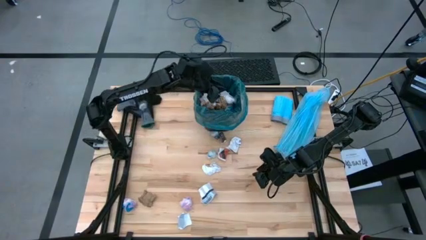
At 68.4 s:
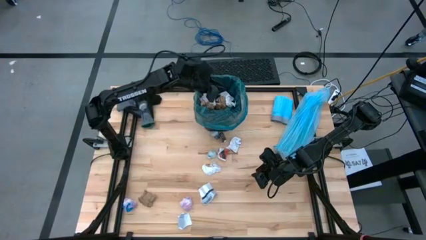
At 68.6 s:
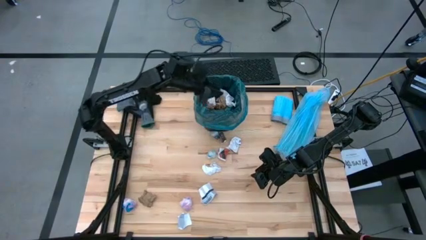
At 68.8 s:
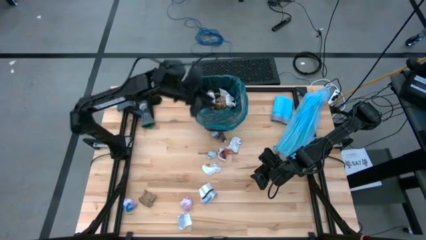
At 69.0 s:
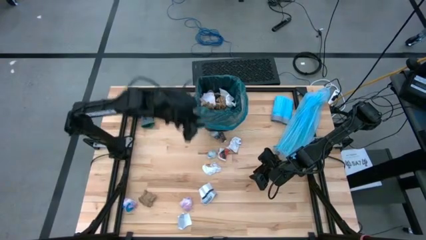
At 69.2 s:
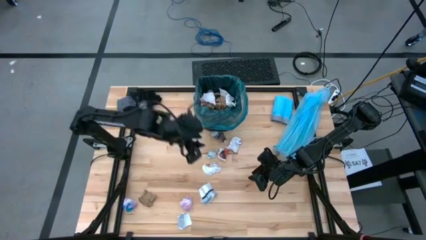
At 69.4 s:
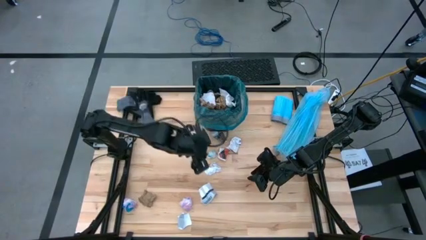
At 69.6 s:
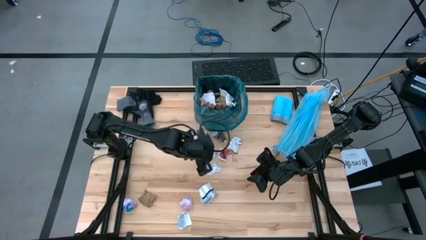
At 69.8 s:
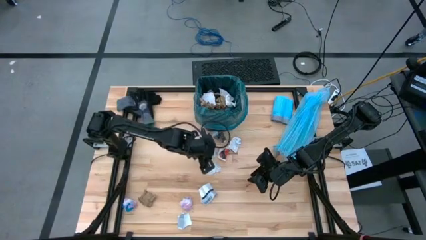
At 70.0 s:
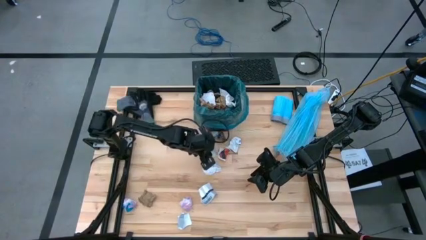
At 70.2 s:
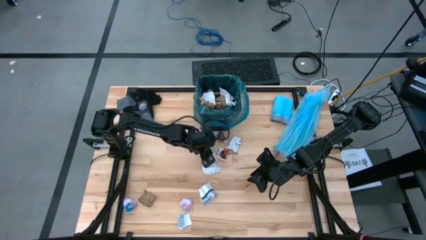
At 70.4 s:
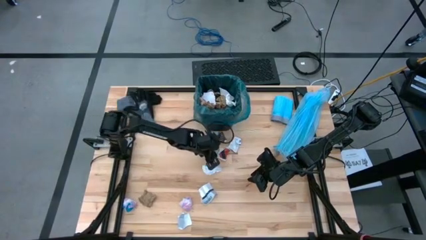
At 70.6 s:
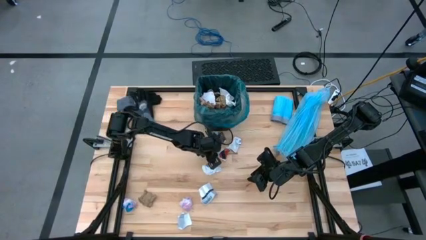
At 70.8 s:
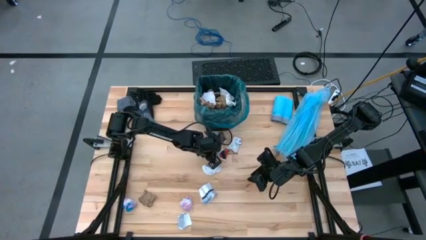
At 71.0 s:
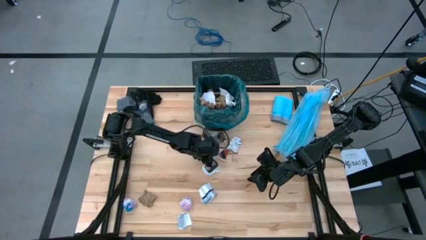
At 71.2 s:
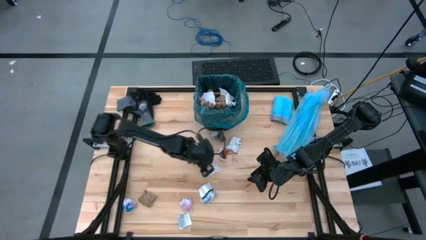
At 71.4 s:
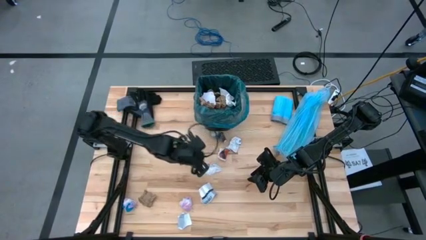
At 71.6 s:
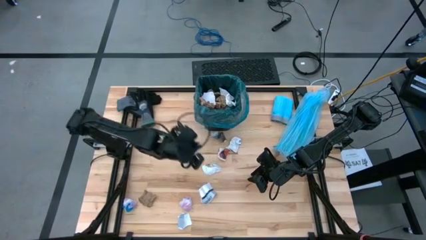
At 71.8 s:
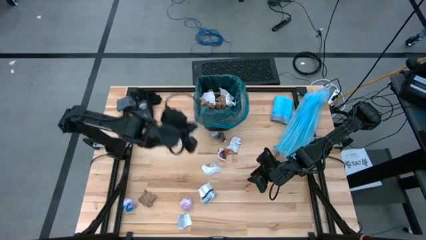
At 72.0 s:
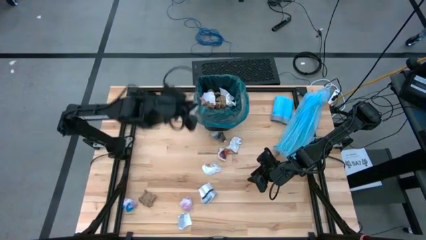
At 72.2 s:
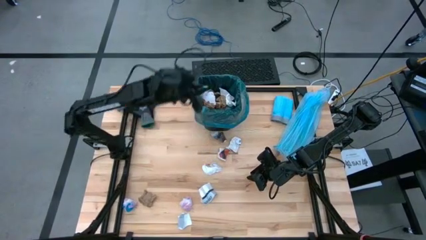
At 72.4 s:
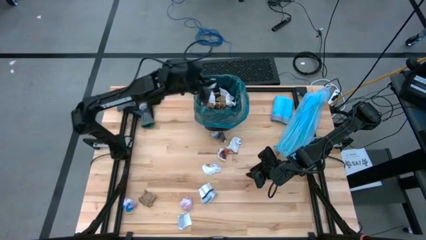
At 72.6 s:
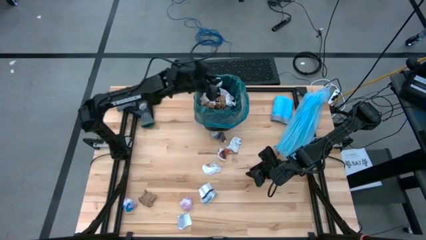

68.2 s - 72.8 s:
Task: place trash/remove bag and relplace
Put the blue plastic into the trash bin

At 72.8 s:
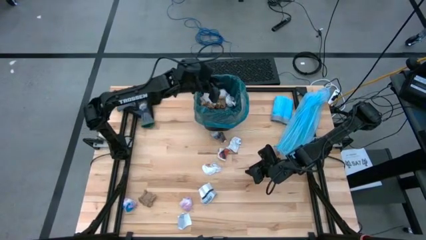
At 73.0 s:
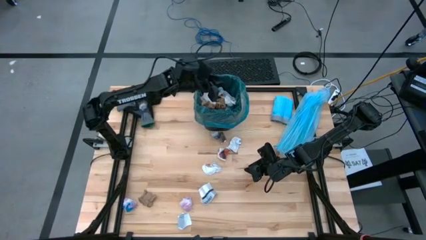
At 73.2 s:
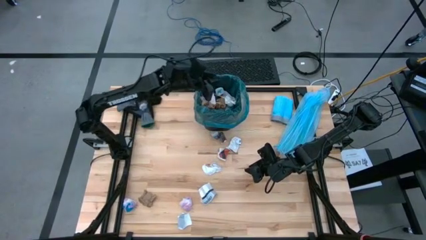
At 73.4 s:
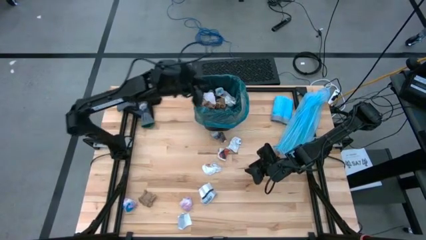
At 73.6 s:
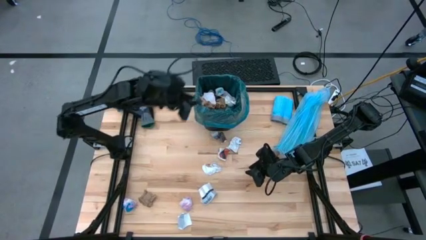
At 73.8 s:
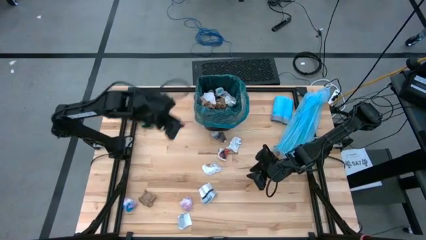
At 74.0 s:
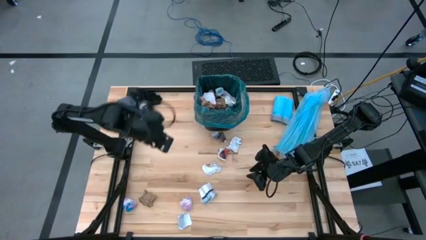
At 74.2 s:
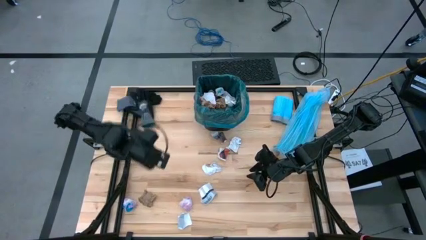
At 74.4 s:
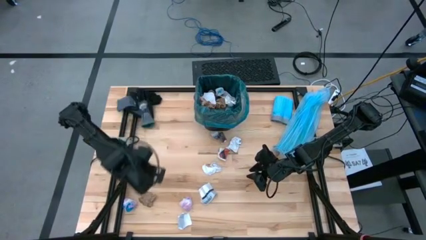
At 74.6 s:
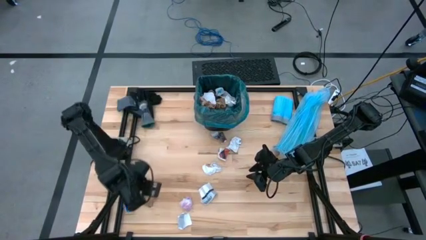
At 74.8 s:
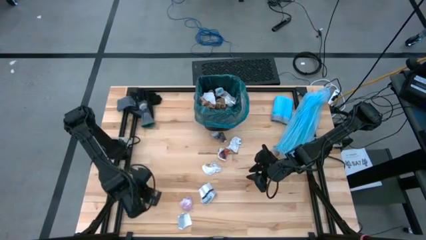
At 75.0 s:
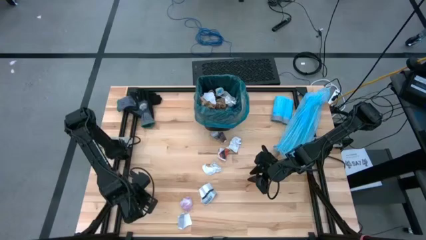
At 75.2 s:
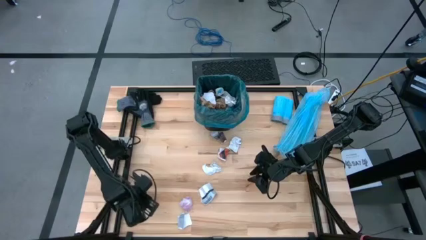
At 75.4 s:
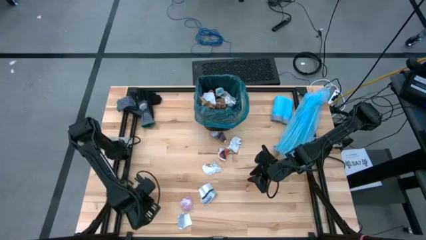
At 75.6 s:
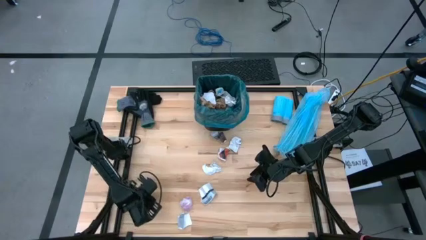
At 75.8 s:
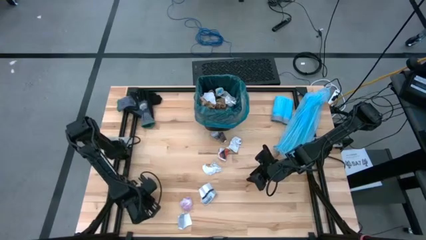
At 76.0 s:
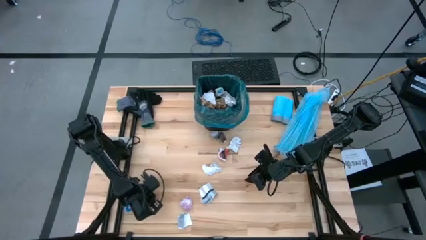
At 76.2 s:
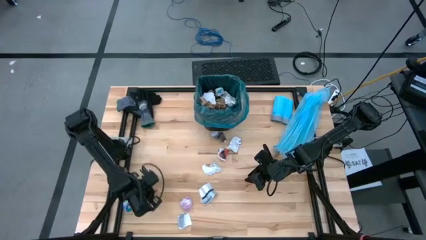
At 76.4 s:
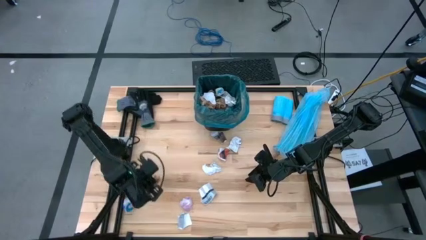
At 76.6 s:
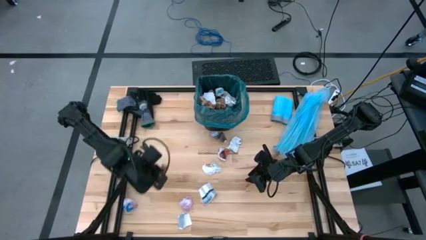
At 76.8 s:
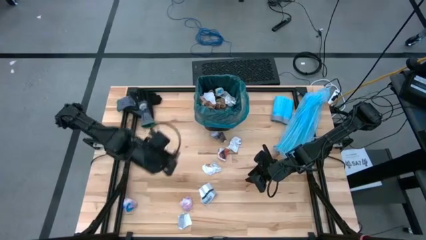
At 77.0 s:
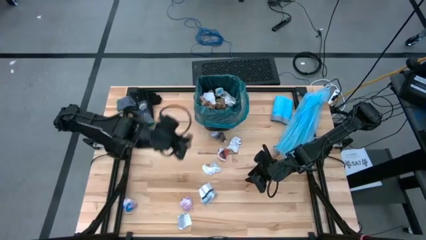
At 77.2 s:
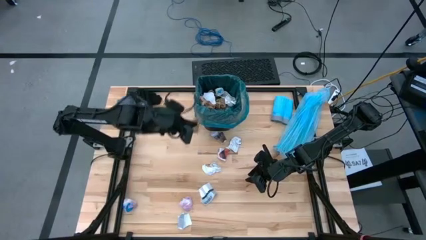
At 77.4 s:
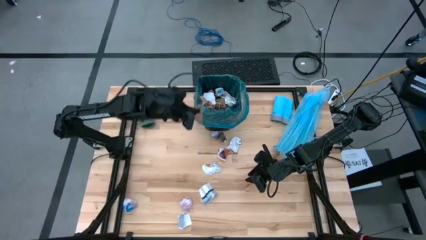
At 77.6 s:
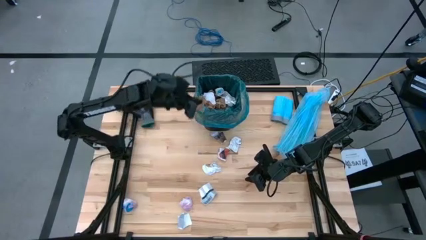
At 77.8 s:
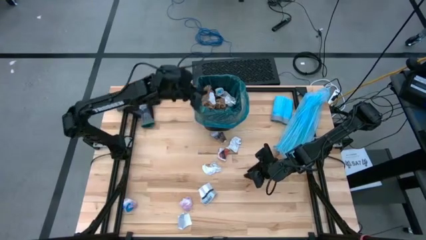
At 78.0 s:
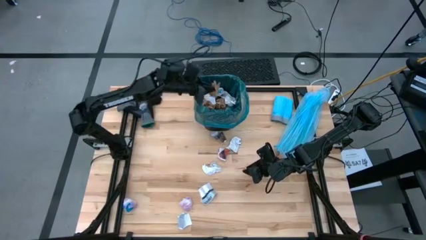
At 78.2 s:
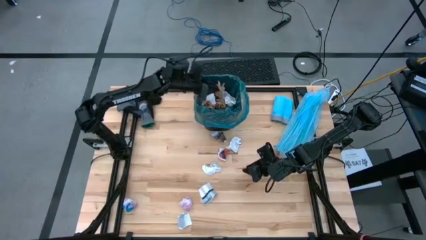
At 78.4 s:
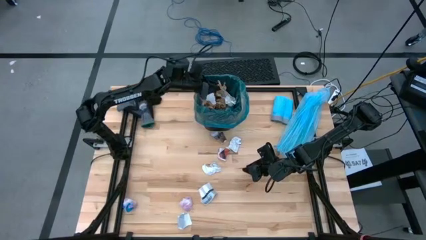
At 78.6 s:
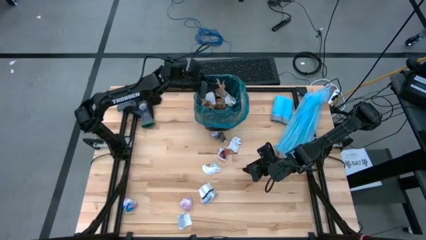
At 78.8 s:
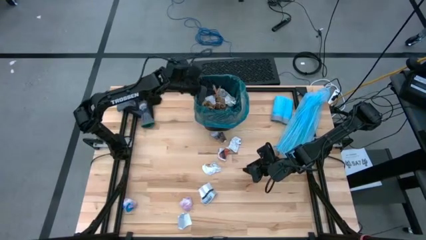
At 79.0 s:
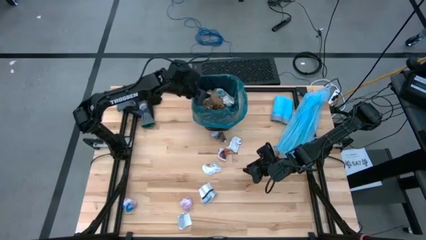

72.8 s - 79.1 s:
Put the brown napkin into the trash bin

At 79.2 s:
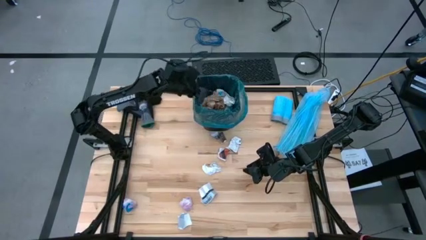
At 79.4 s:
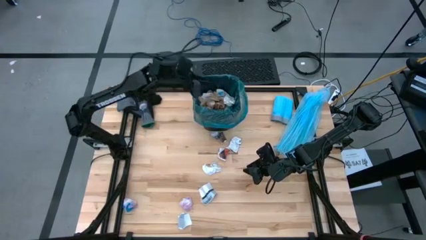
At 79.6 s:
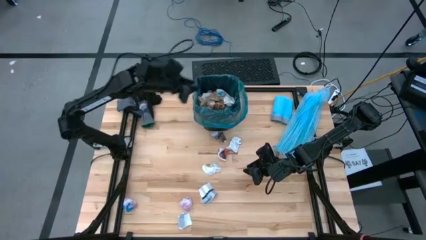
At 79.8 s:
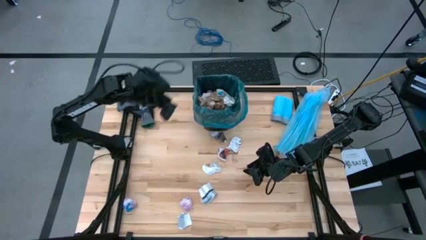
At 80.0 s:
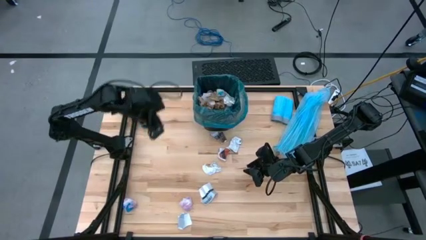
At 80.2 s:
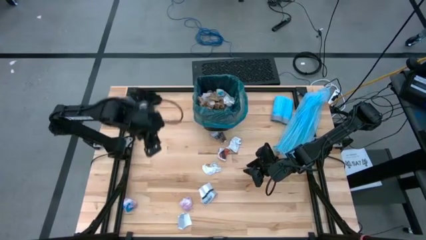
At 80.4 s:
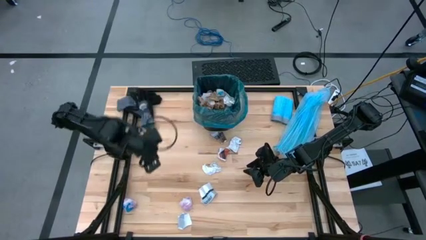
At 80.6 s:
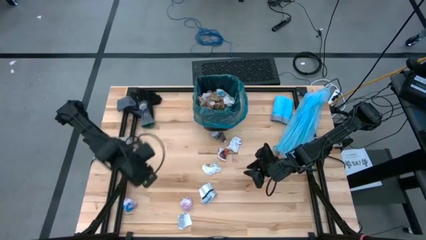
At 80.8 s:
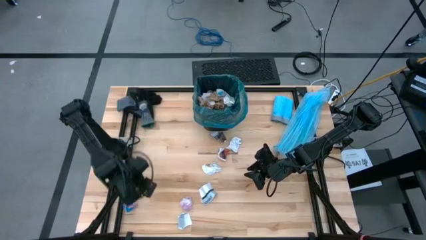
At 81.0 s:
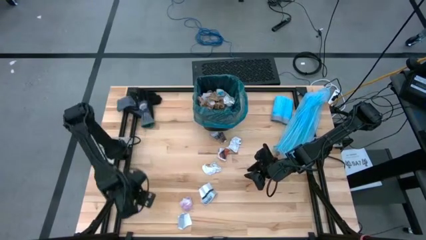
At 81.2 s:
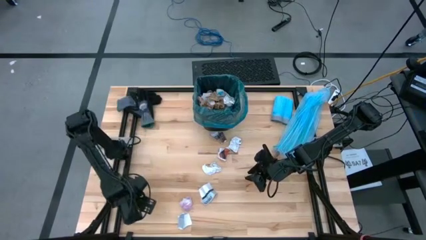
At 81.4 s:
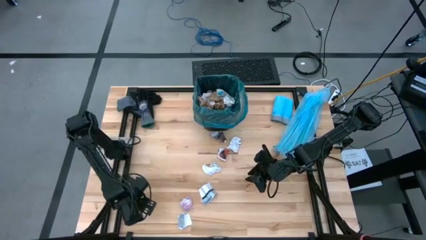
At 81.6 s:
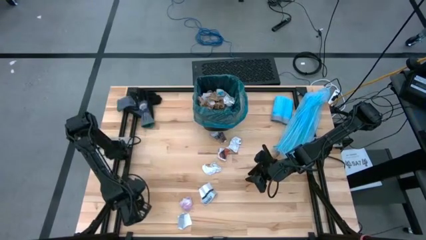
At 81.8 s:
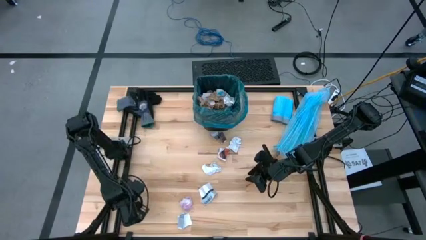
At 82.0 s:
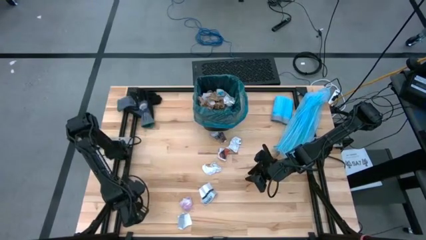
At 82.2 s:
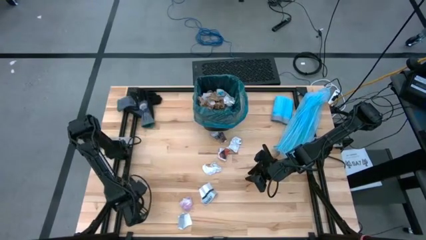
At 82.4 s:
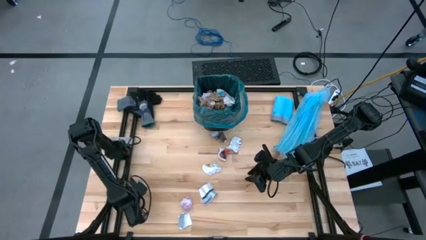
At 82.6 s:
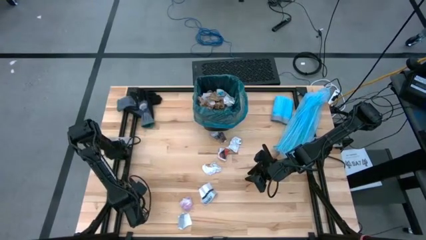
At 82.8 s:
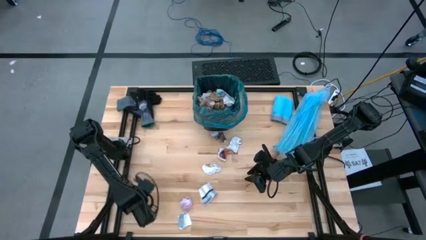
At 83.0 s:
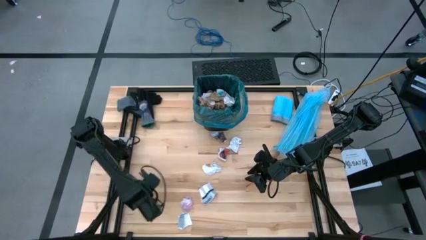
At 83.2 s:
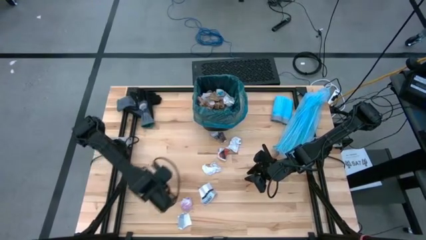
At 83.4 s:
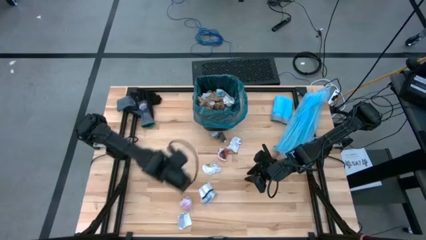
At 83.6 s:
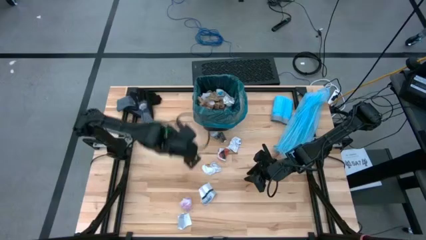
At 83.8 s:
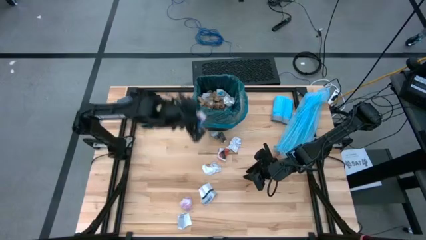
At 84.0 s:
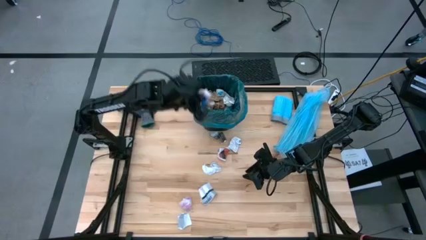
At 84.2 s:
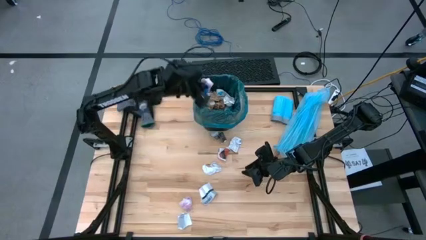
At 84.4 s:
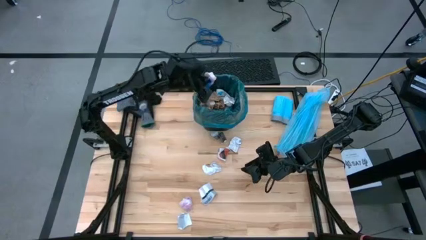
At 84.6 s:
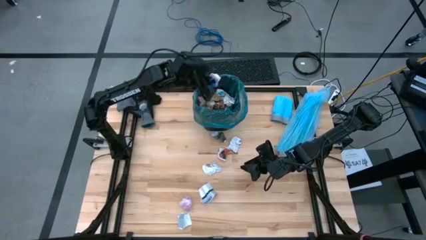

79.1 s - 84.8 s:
Put the pink plastic into the trash bin
